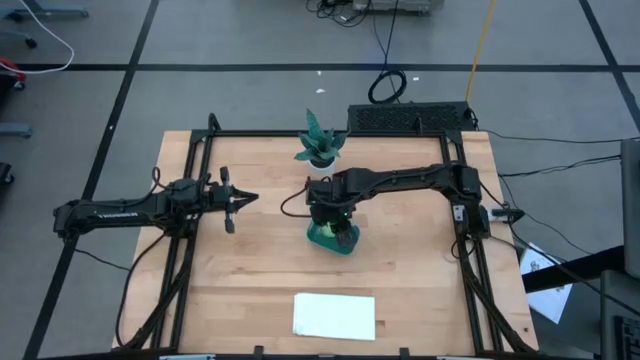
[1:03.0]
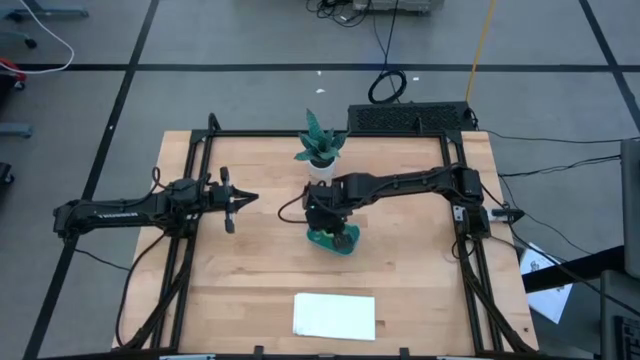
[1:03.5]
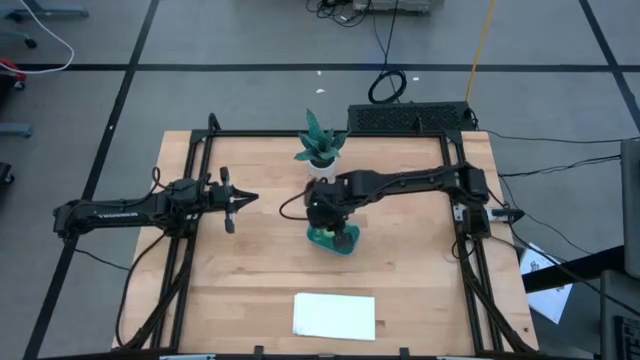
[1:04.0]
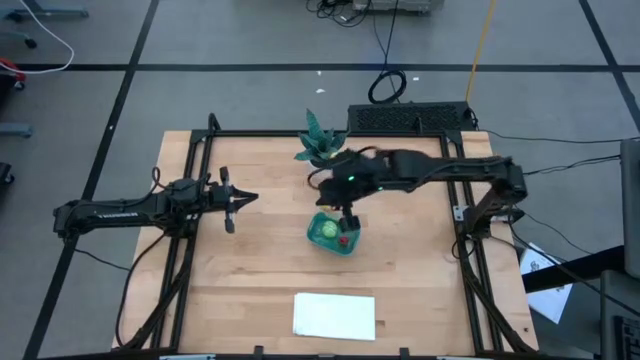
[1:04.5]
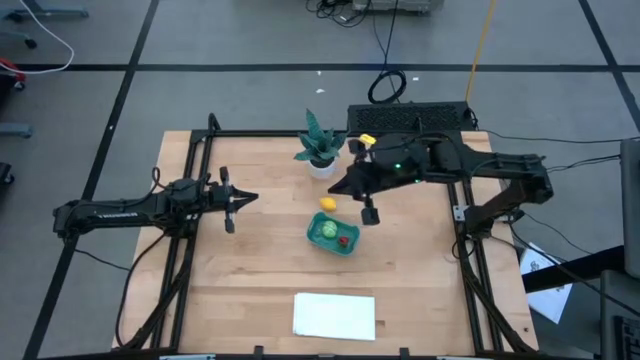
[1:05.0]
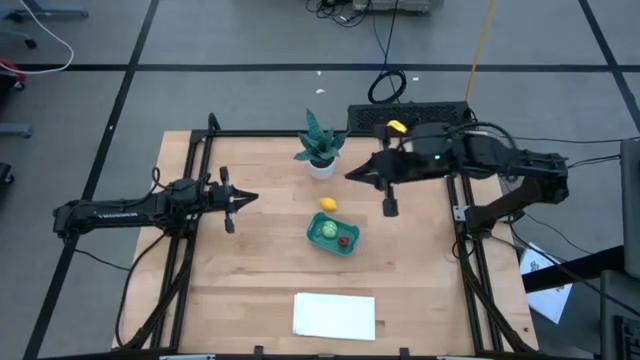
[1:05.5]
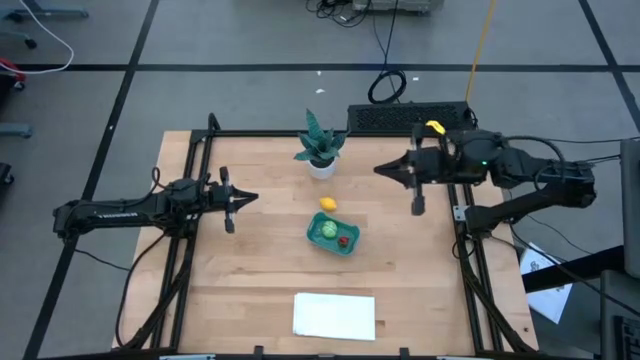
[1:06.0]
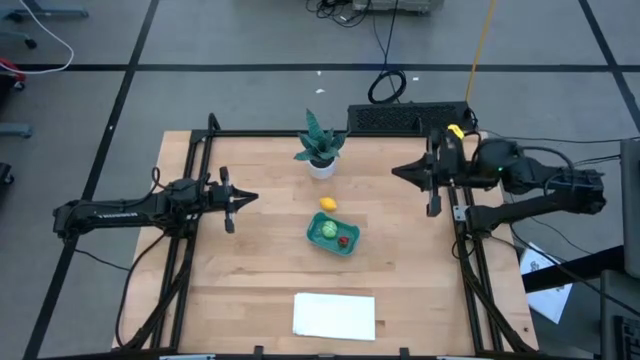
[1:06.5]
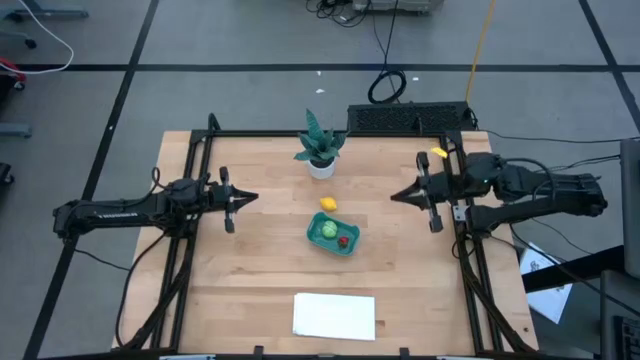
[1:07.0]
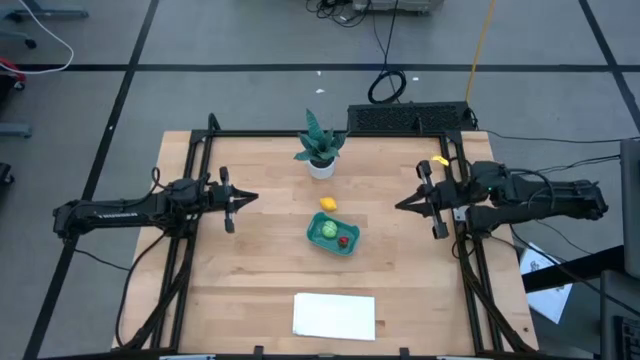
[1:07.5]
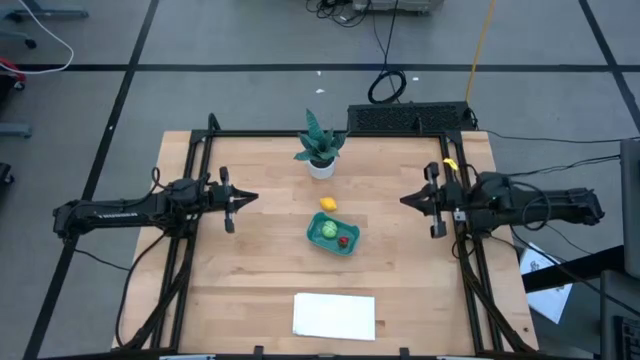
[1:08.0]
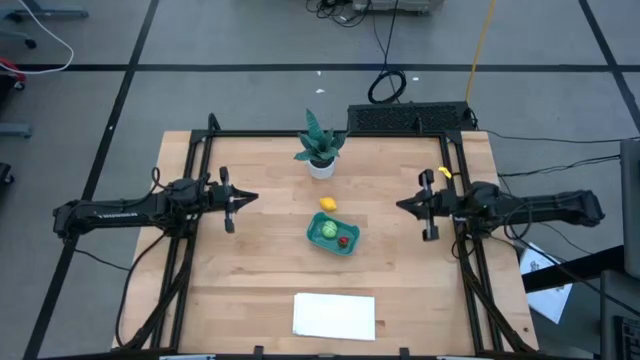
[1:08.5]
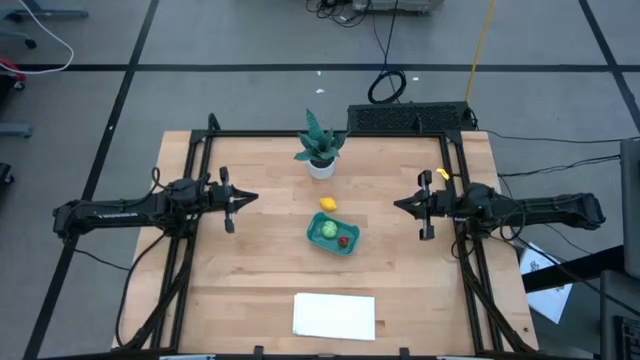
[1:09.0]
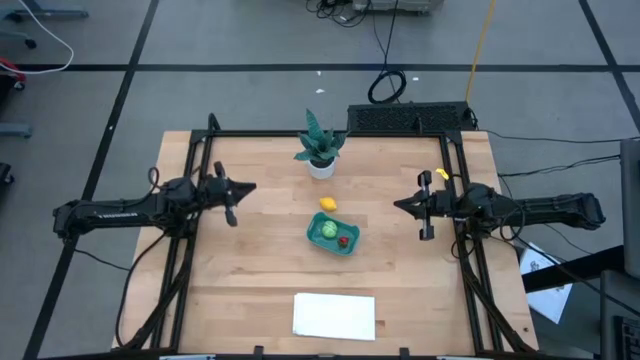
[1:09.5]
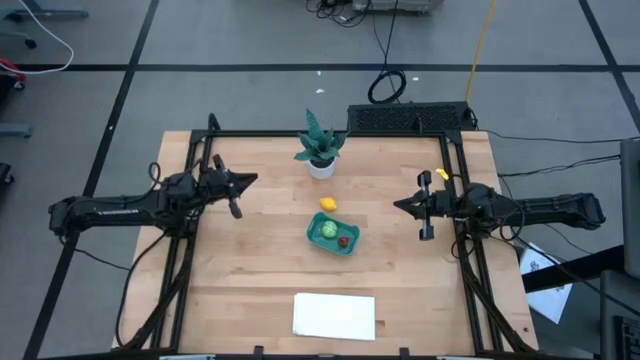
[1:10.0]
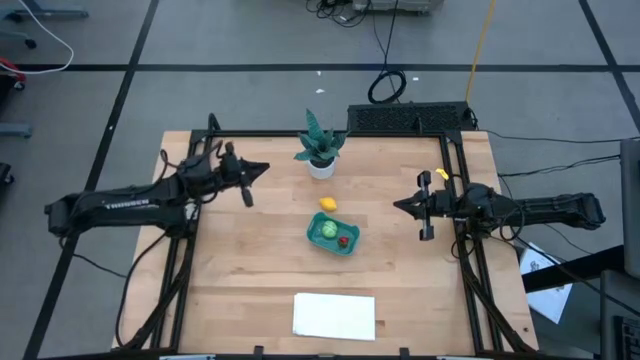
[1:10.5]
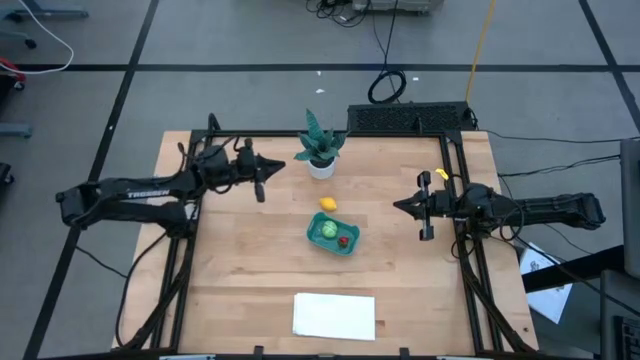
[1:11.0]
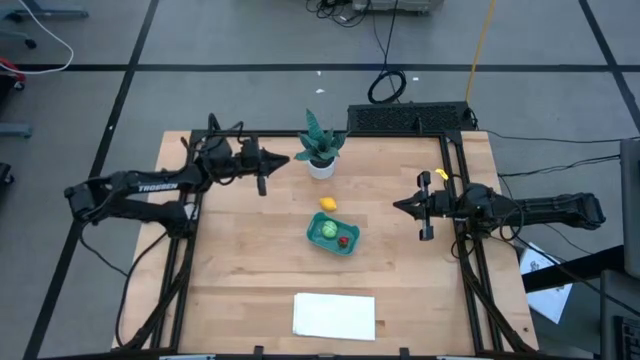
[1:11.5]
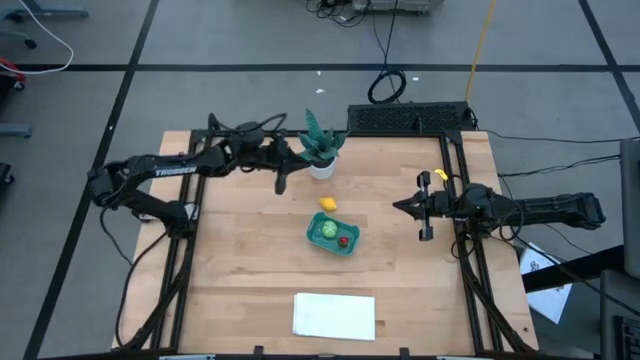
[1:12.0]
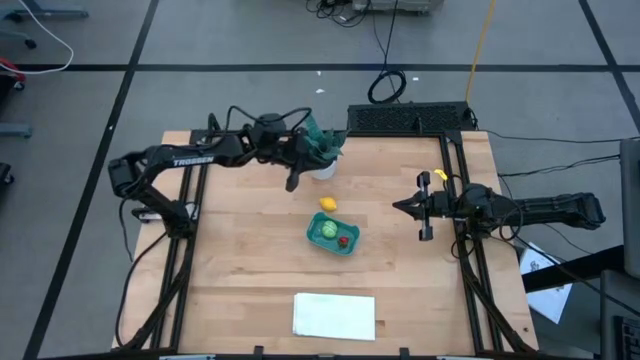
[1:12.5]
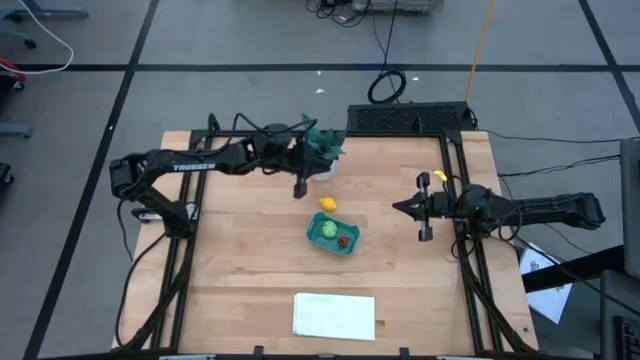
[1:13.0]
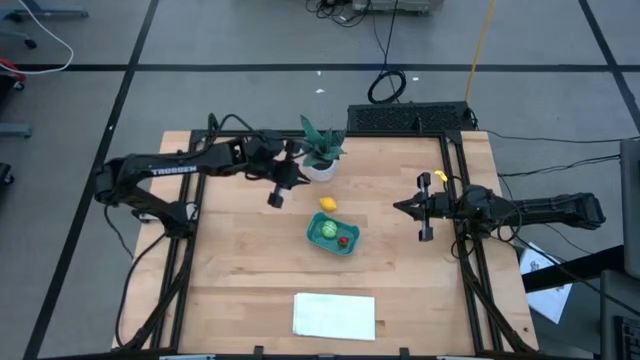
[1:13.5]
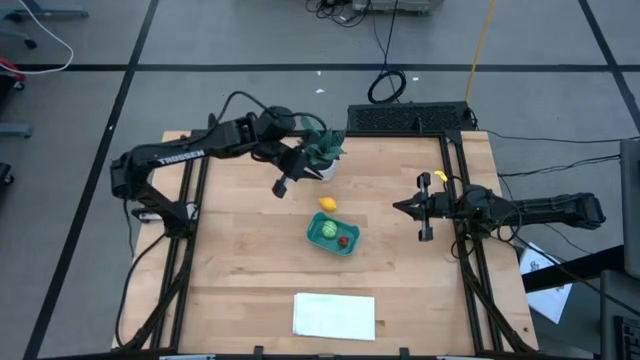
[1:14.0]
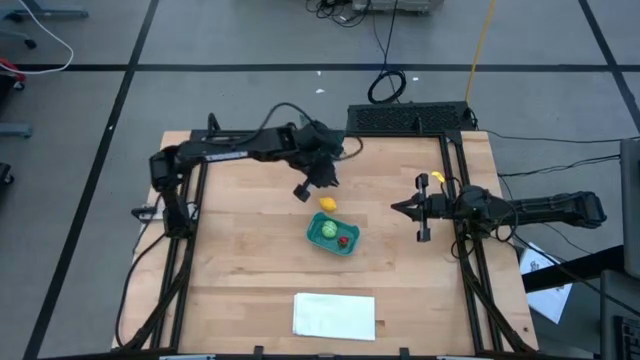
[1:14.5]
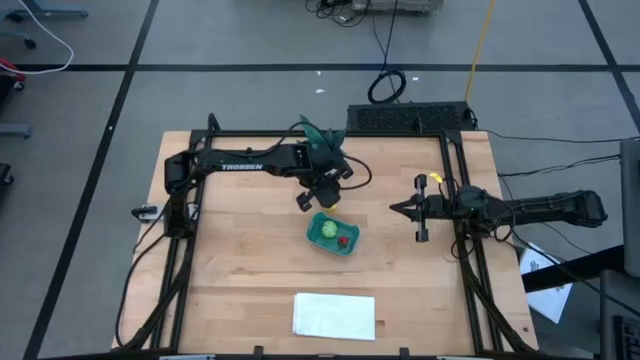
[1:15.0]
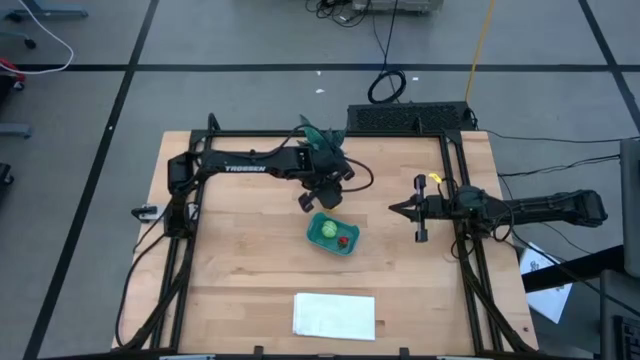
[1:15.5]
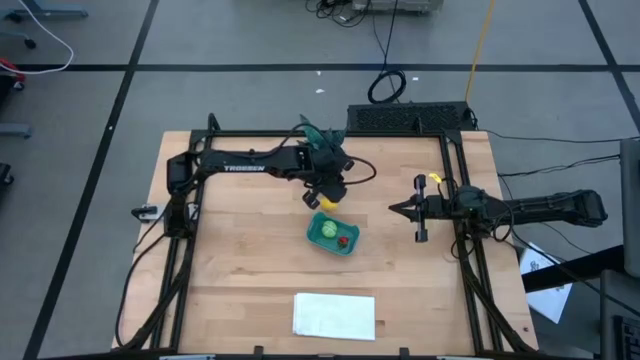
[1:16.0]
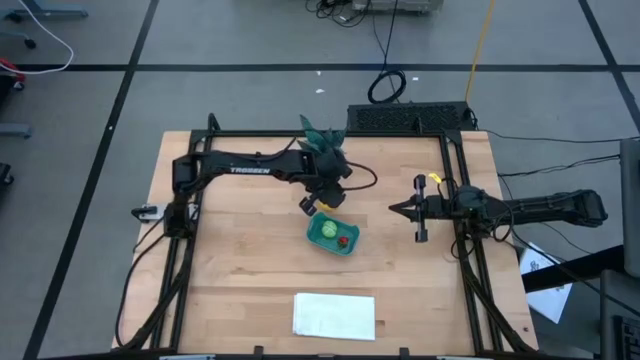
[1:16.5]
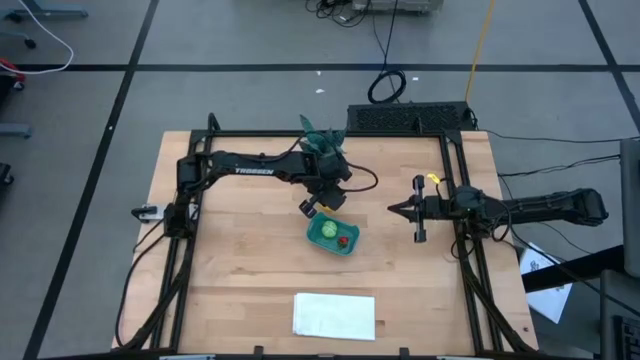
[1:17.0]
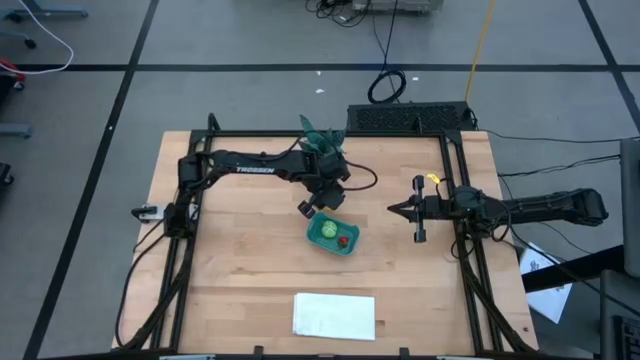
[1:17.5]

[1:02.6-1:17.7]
Task: Pick and placing Produce into tupperware
Put the yellow lemon into the green bin
